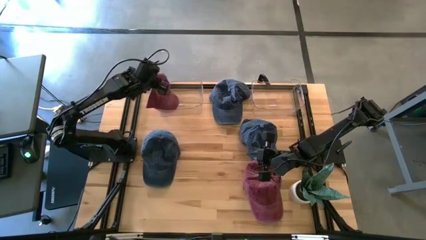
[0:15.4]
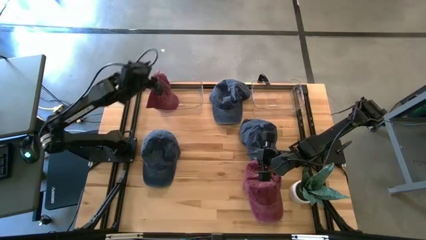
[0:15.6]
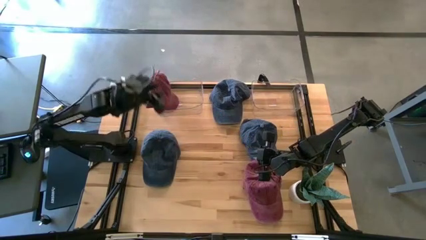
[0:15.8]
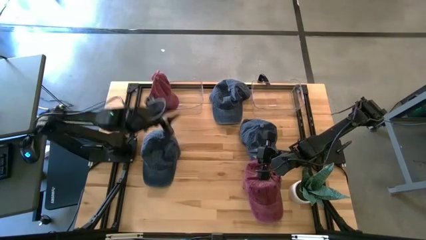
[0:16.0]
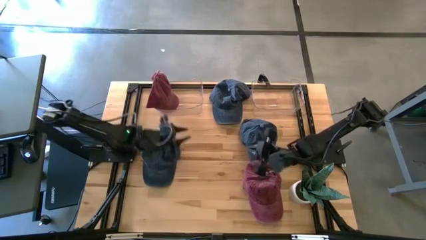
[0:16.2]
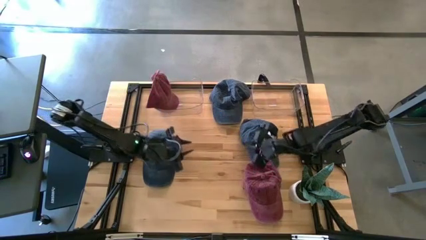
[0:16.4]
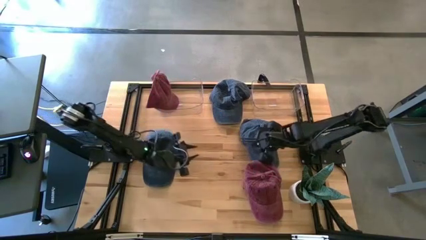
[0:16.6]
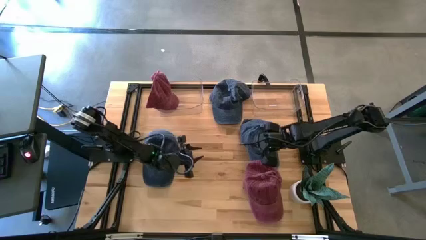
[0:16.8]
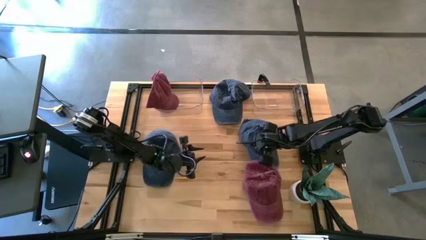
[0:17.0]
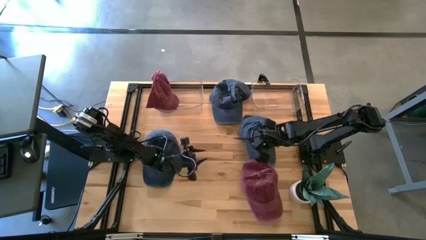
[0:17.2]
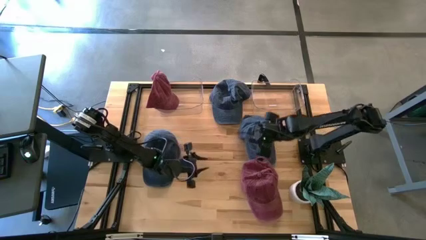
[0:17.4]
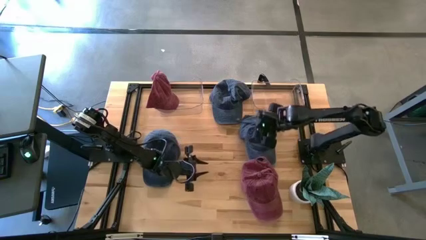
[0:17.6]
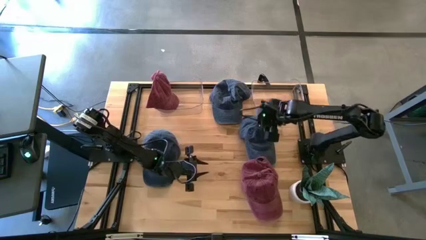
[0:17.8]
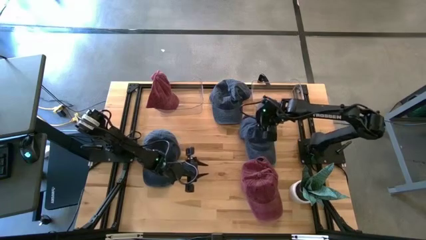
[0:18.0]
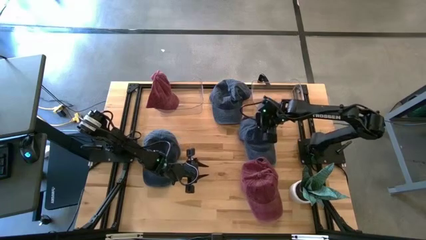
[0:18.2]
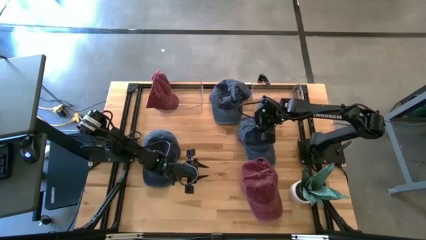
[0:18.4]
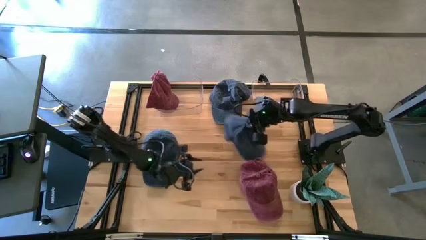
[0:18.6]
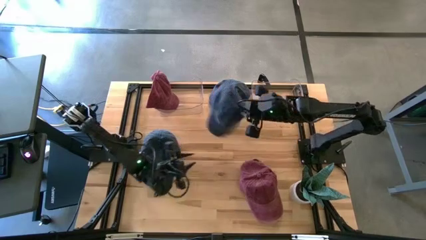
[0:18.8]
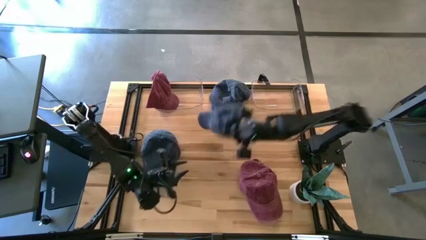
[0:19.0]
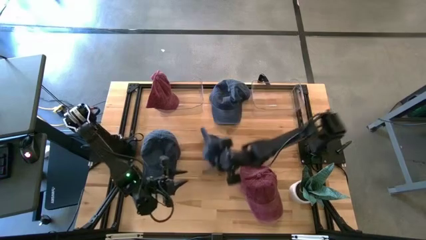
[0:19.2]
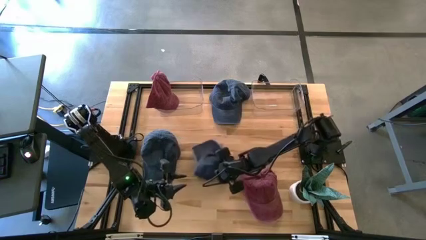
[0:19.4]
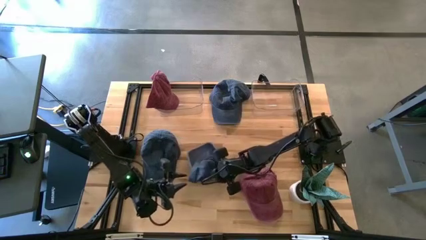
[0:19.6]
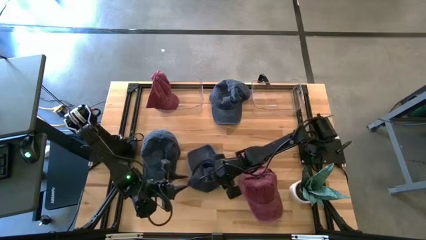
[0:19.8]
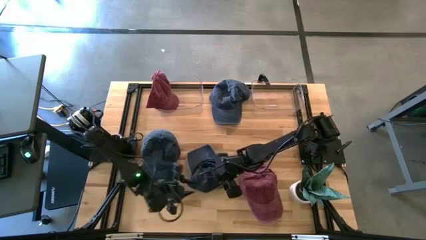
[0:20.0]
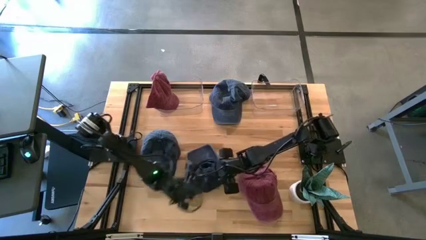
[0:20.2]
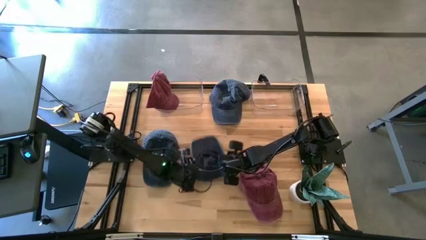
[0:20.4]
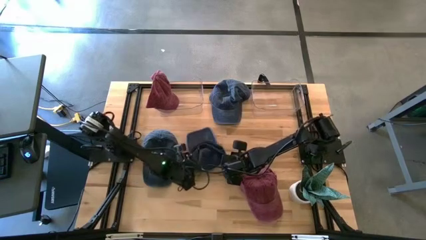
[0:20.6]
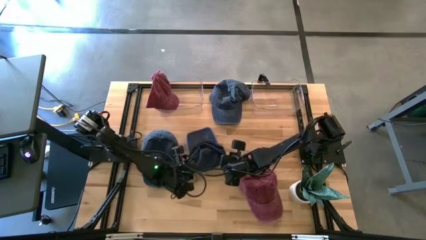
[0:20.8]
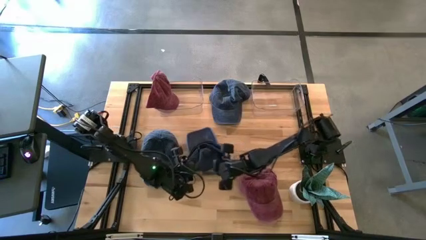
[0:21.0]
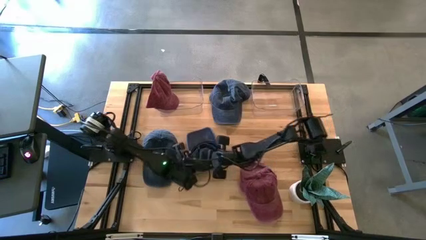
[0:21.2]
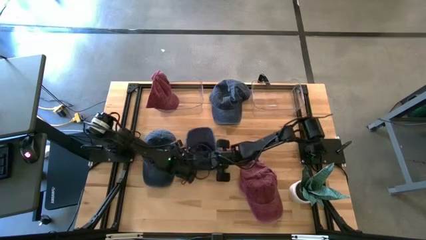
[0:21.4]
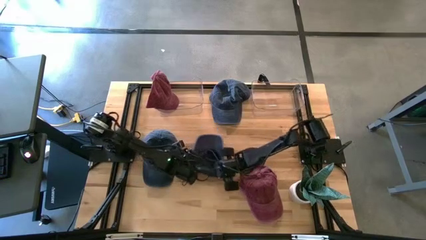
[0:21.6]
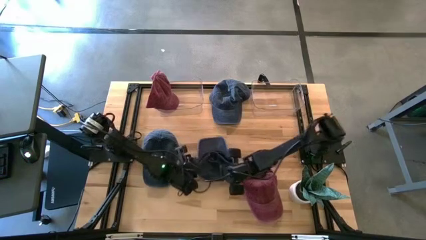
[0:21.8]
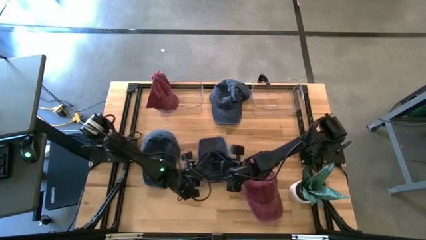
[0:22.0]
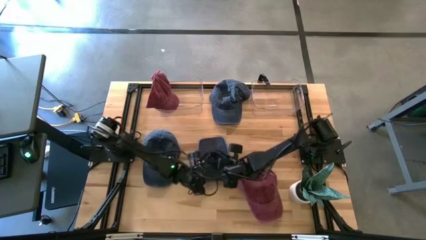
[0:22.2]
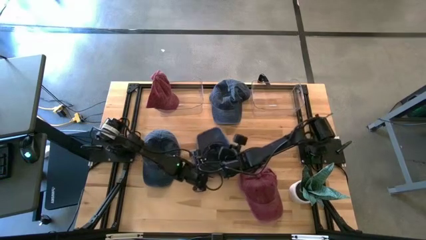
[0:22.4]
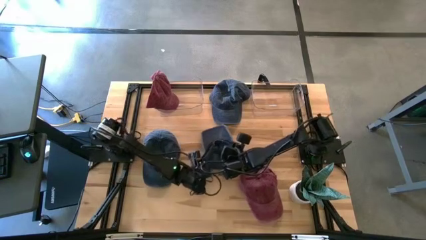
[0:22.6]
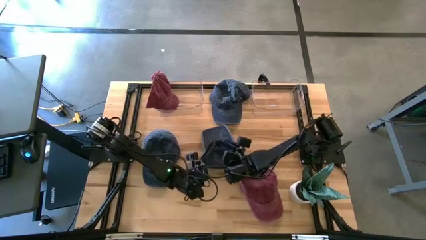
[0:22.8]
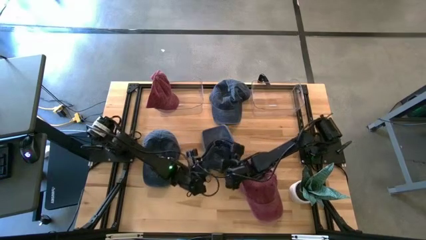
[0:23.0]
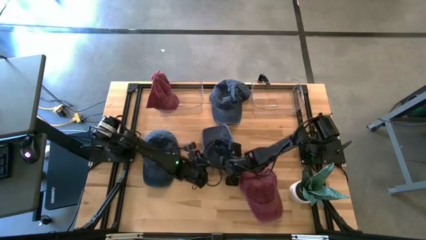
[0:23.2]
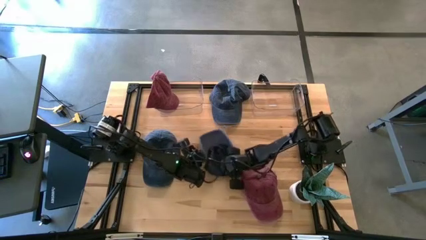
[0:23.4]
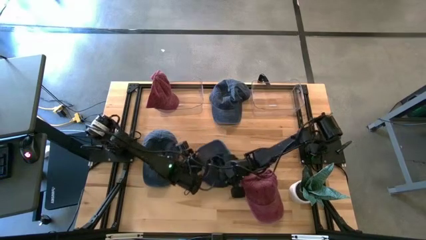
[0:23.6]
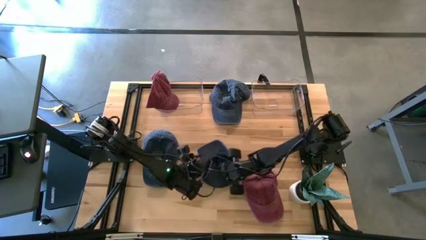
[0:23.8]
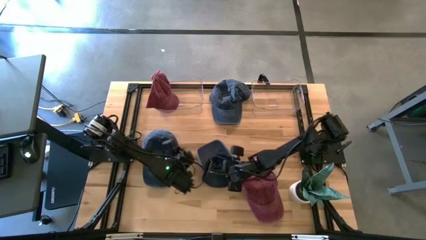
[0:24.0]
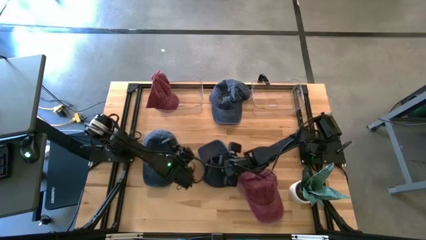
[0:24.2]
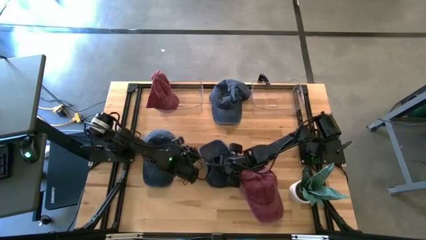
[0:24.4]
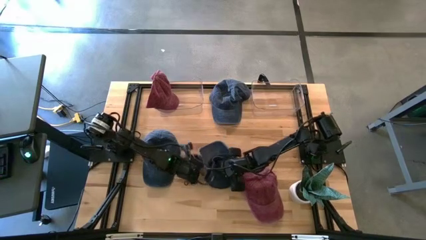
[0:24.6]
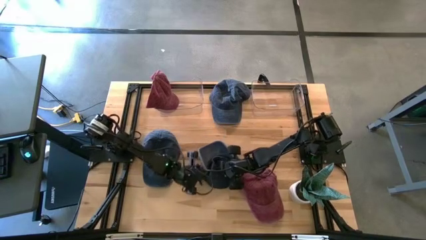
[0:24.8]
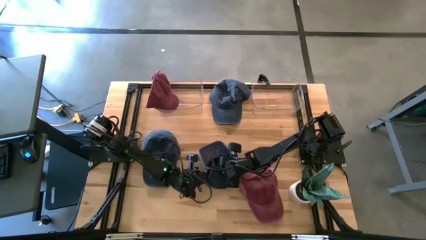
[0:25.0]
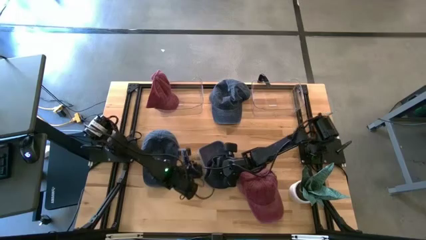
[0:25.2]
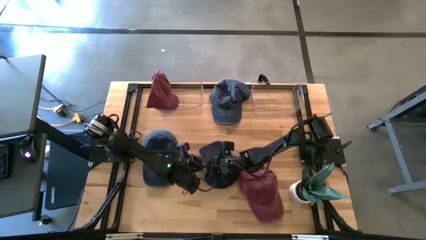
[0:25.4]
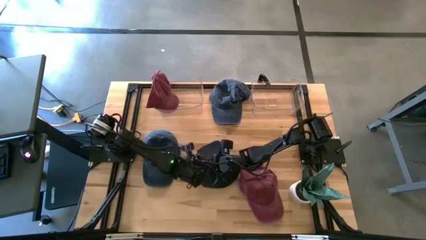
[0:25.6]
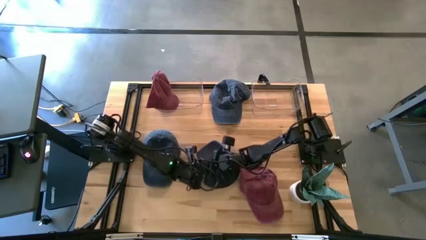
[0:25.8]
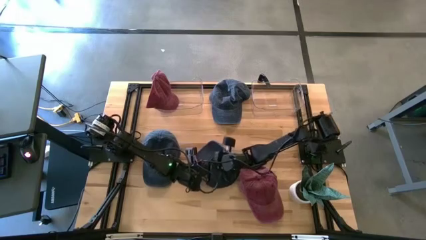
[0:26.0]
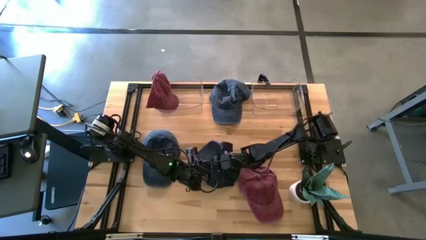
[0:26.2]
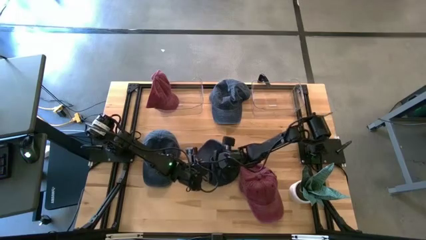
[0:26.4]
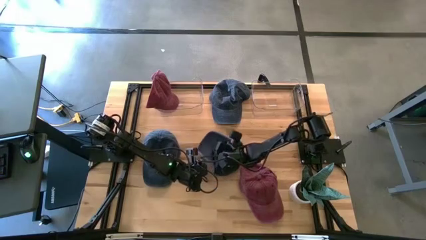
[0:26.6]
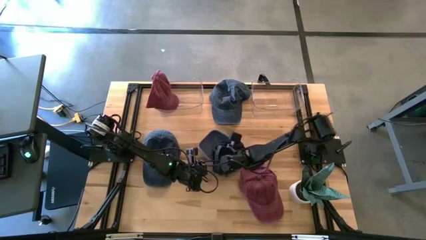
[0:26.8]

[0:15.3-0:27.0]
Task: Pick & Place hat
Put the bottom right blue cap into the right transparent bin
